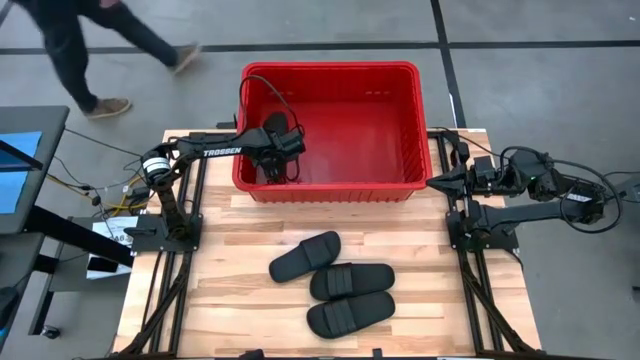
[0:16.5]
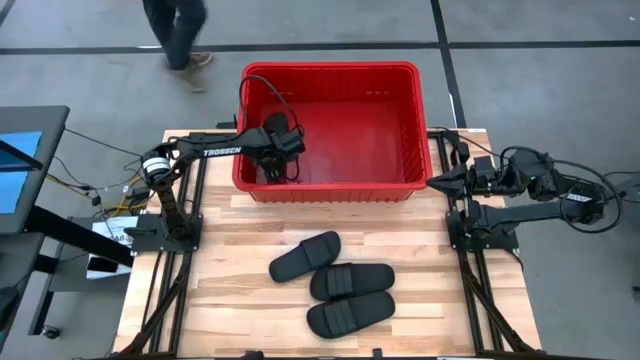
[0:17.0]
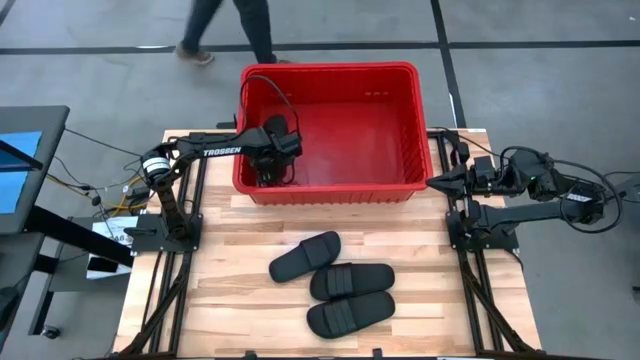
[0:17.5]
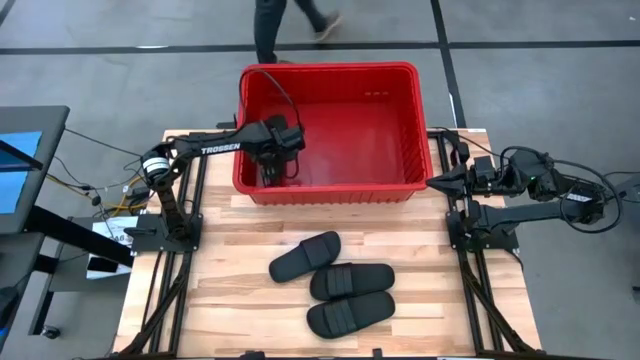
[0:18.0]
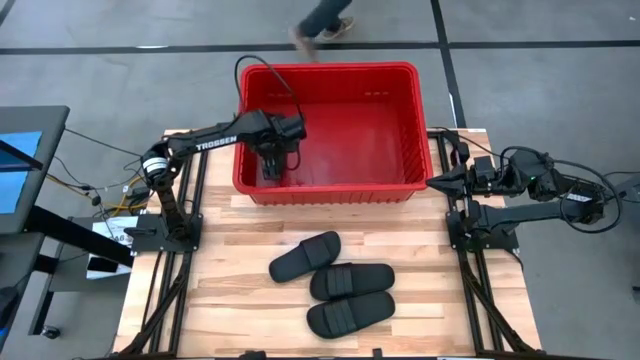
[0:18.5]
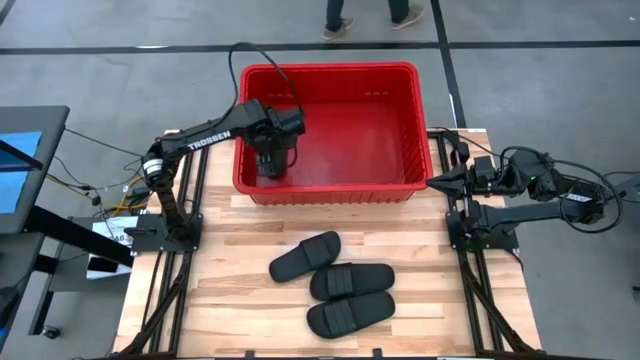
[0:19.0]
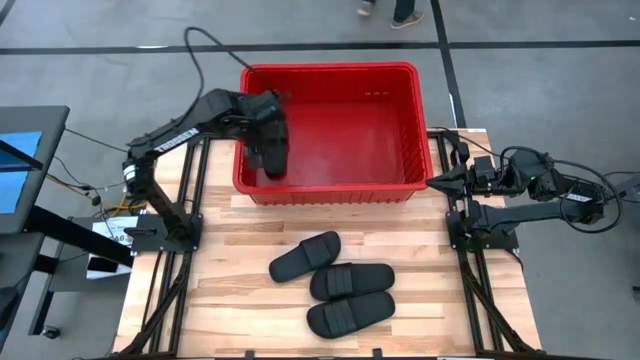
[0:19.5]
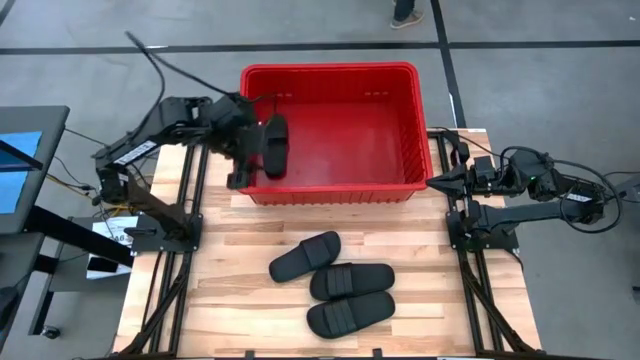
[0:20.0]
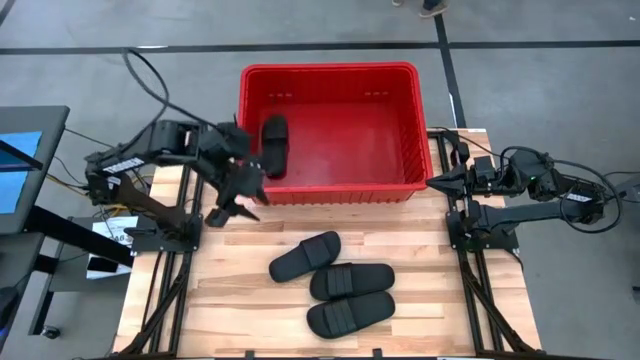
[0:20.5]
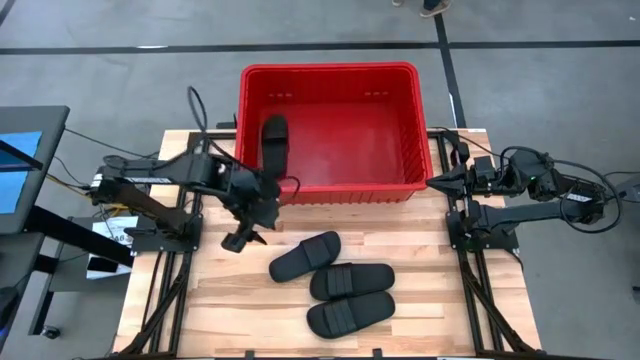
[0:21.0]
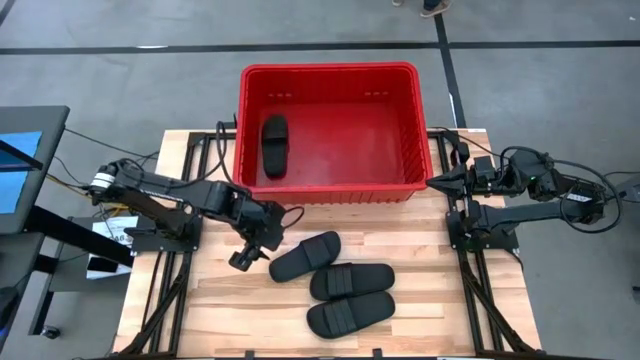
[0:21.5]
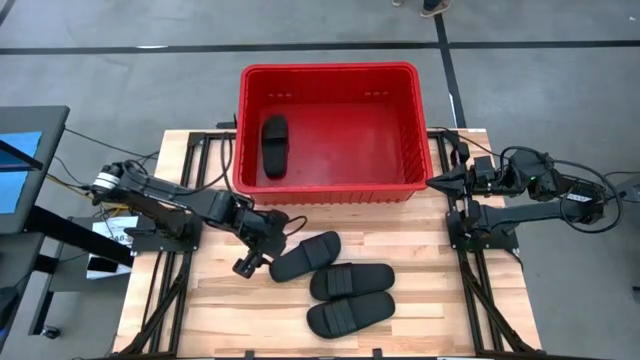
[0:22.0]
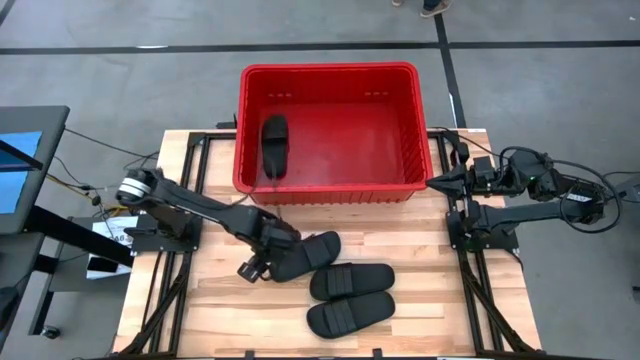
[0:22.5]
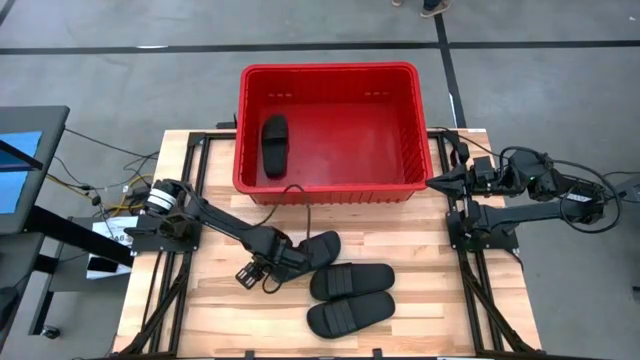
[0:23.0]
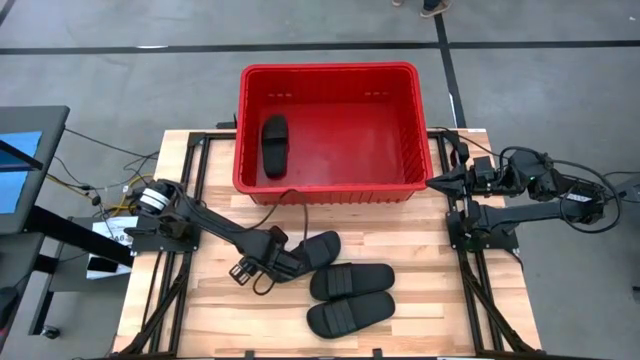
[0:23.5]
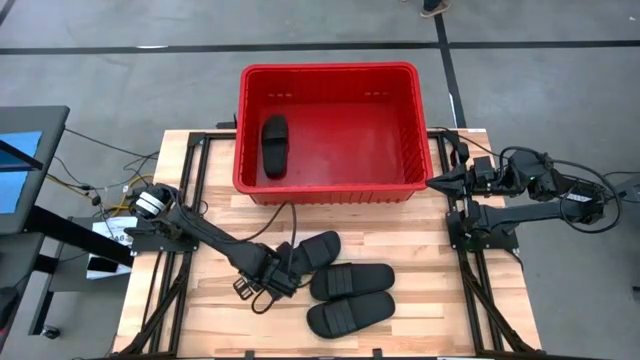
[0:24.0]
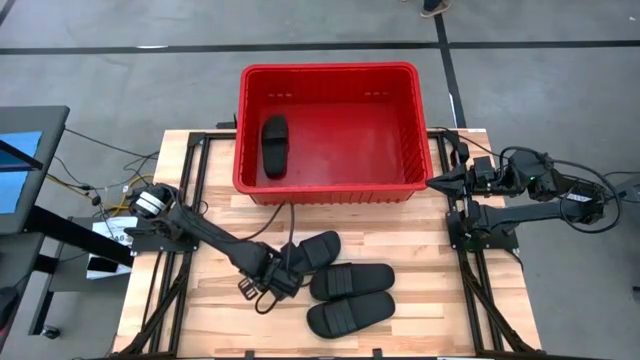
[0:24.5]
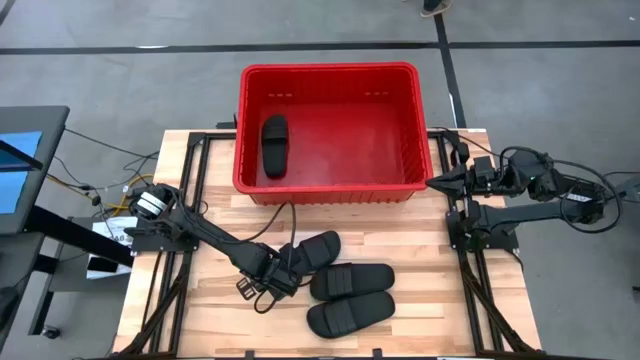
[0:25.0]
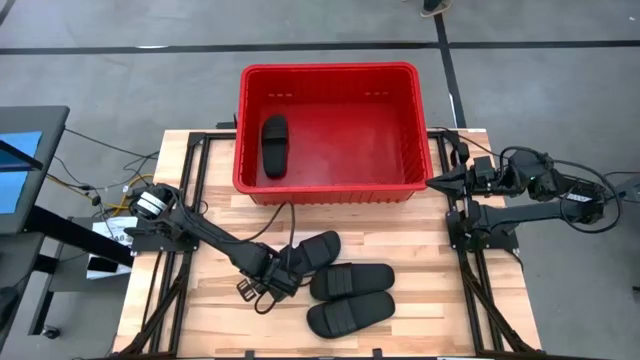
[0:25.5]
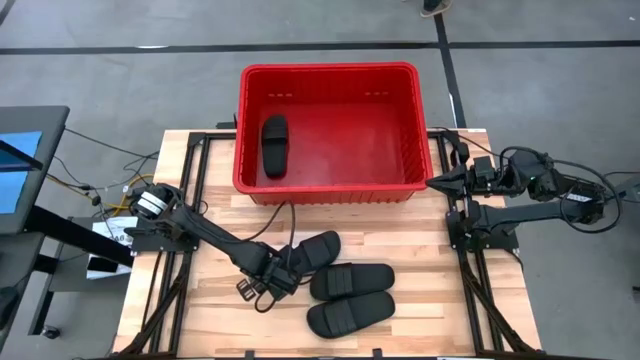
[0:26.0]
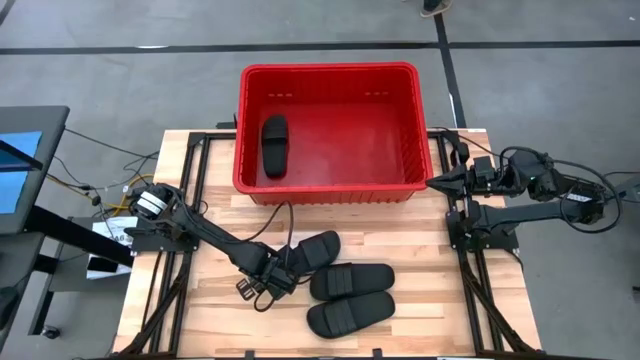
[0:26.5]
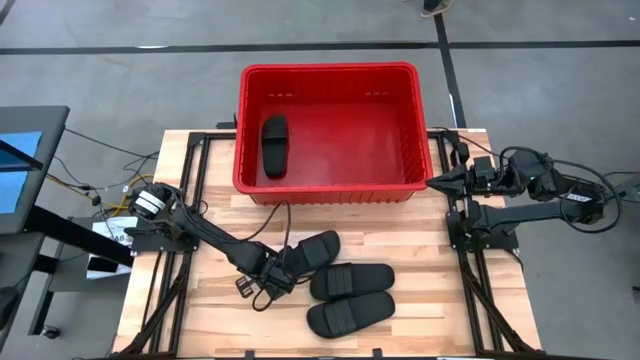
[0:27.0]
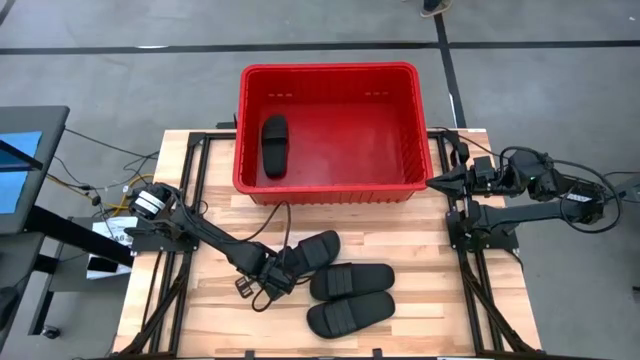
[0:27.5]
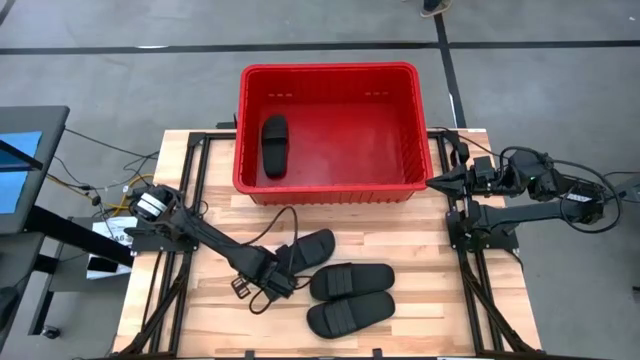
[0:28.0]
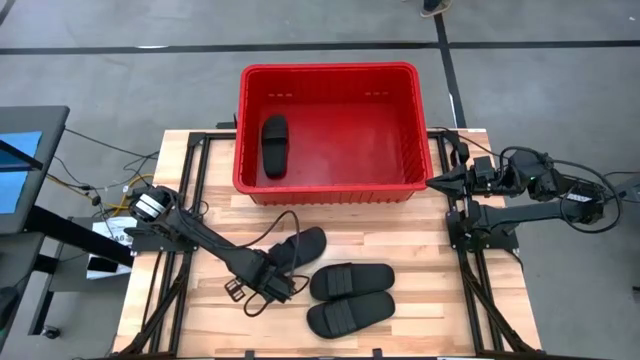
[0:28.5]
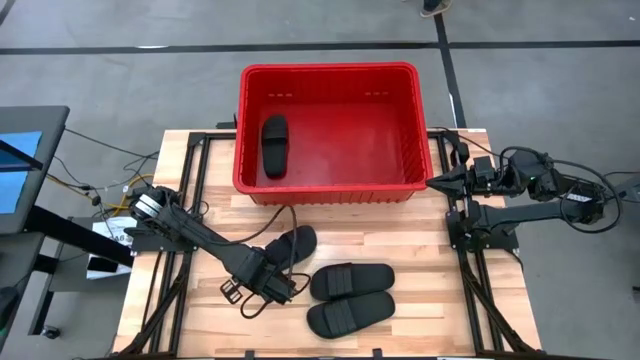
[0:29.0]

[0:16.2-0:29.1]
Task: Pick and place slides into bin
Put the top black slipper into the red bin

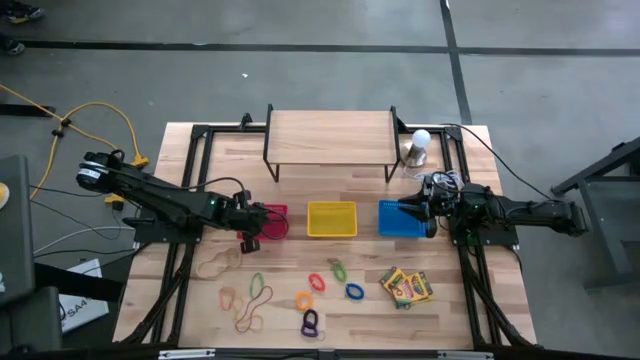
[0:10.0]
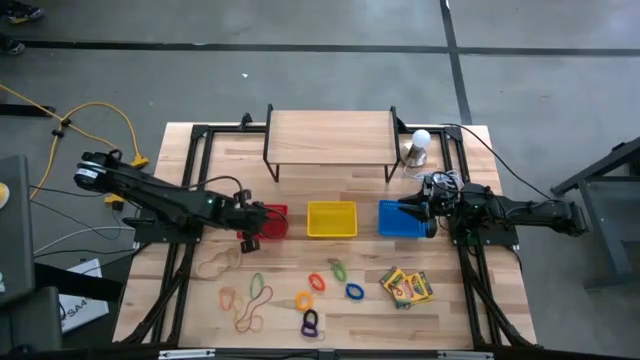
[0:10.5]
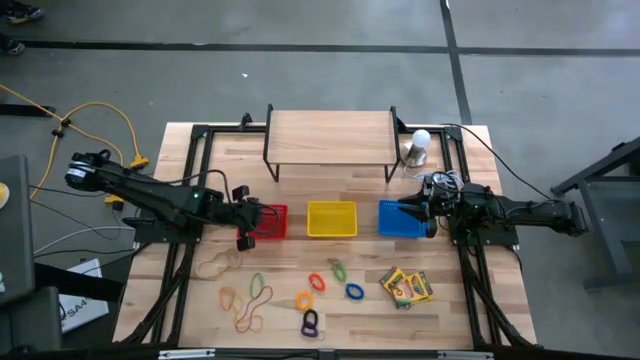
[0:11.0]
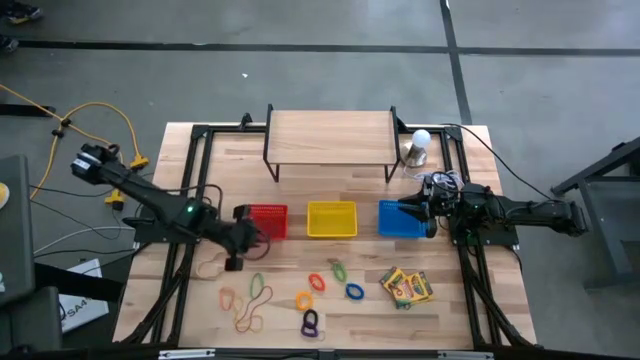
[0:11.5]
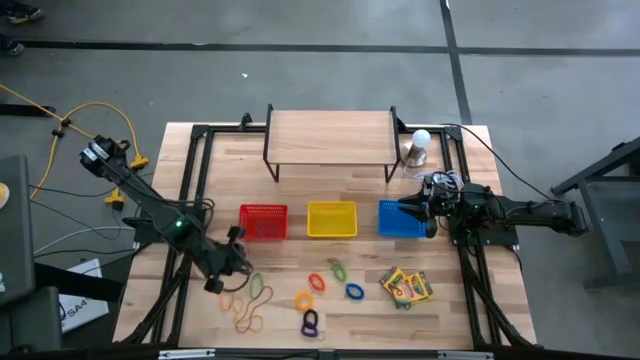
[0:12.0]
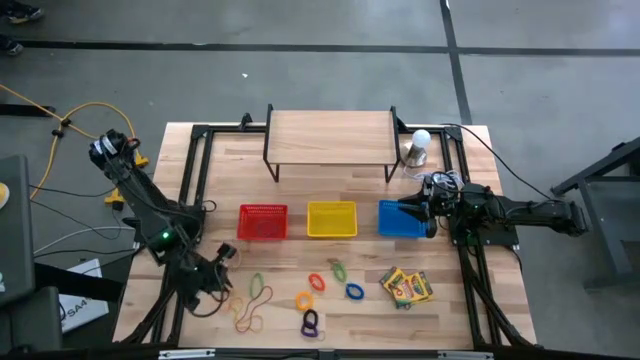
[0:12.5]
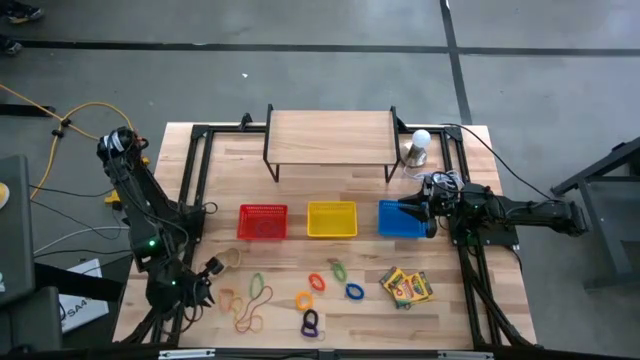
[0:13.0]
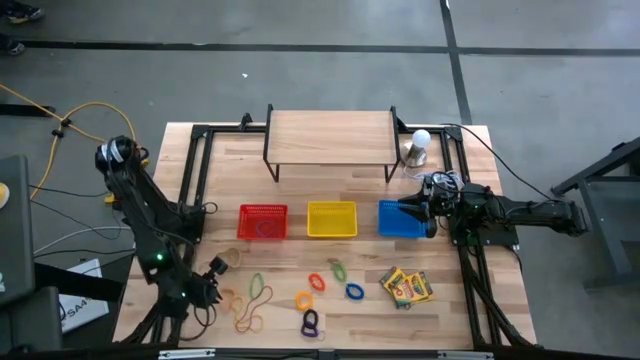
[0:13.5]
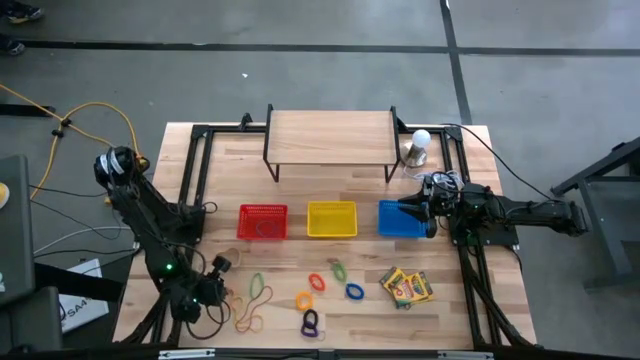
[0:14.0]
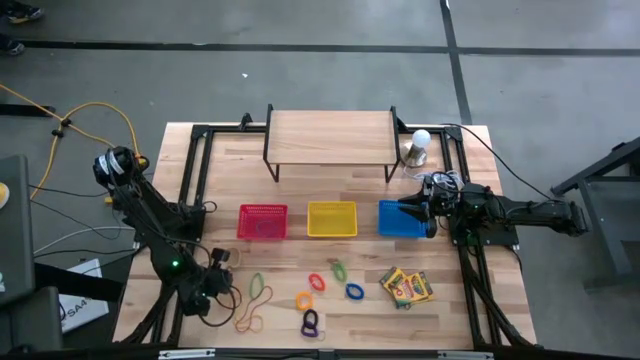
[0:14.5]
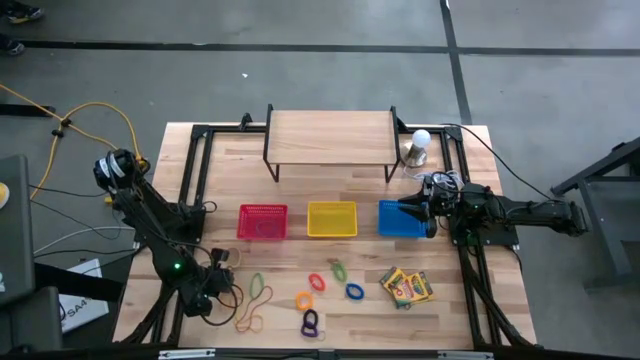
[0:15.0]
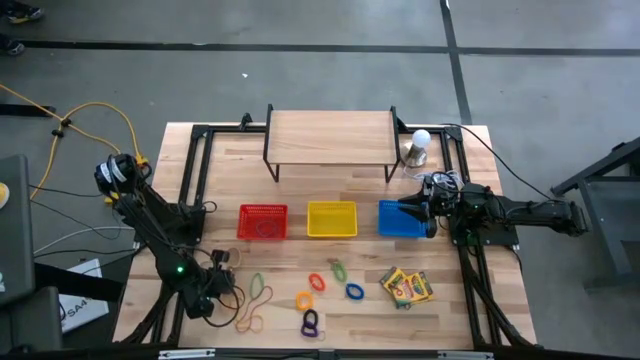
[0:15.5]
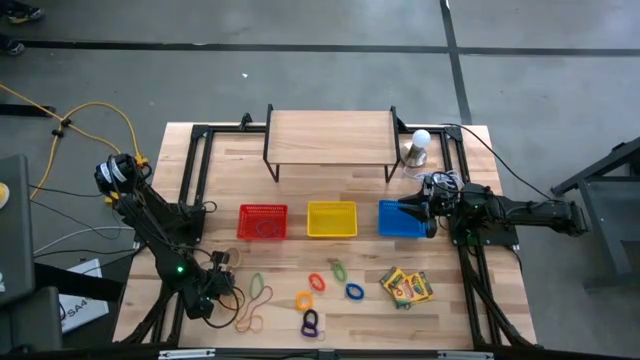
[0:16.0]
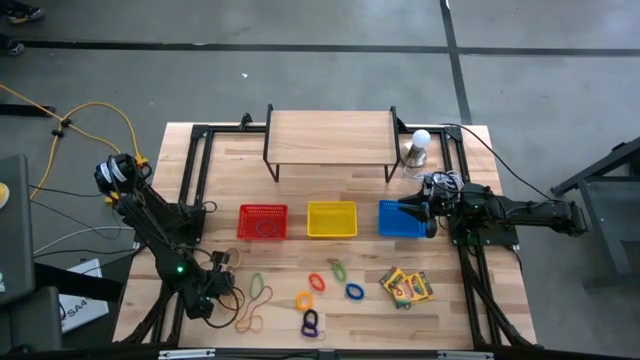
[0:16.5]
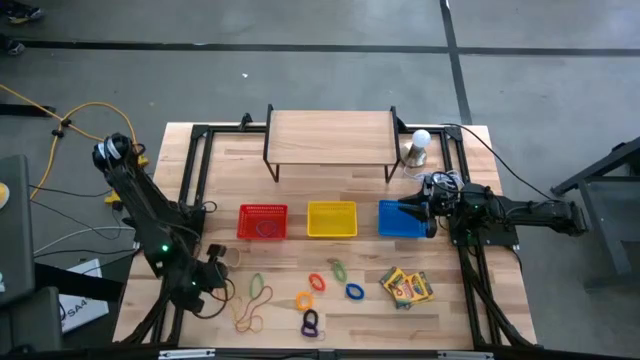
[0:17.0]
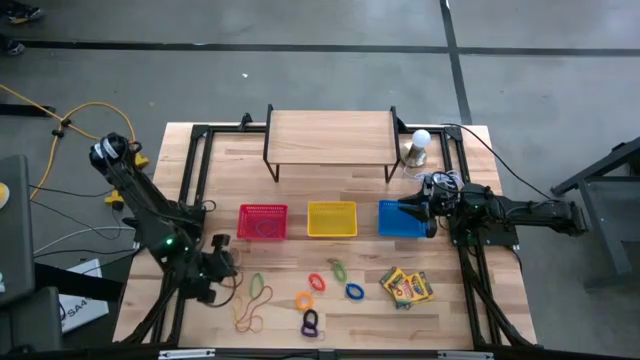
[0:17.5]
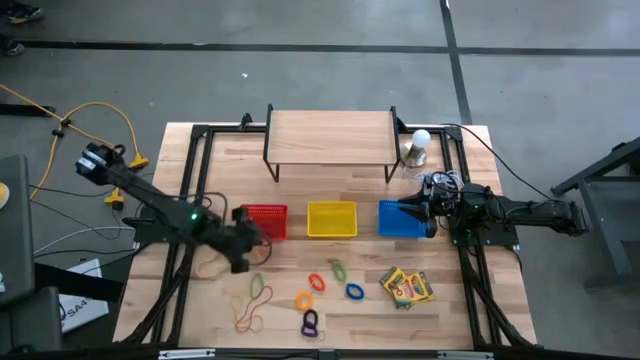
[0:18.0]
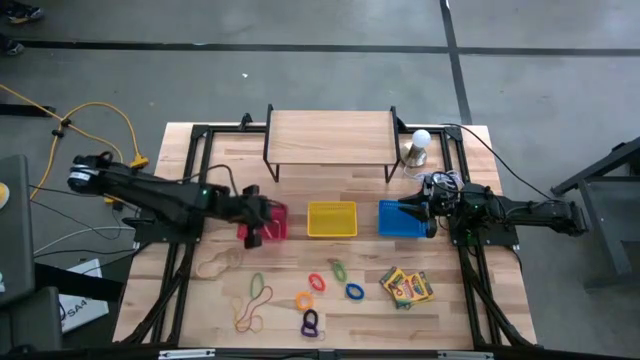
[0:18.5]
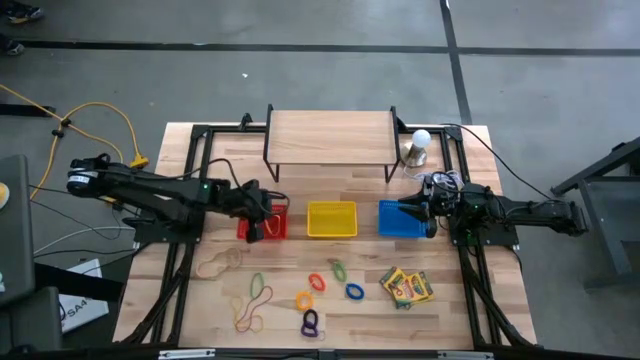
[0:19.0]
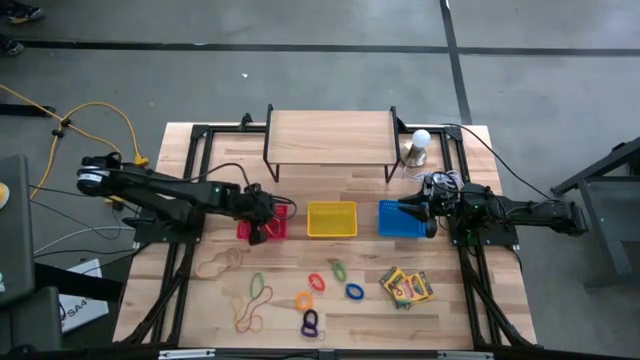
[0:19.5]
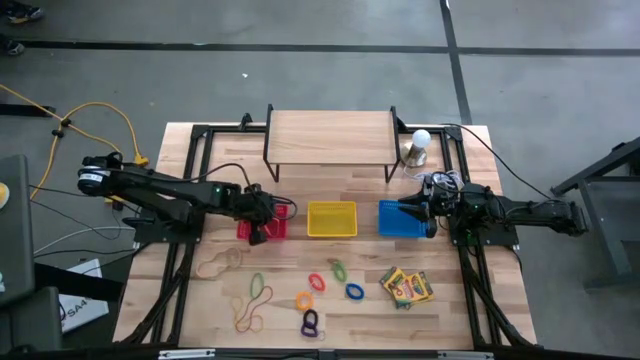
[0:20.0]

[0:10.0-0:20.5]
Task: Pick & Place Office Desk Supplies
Put the orange rubber band into the red bin
